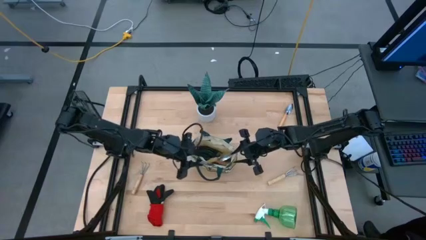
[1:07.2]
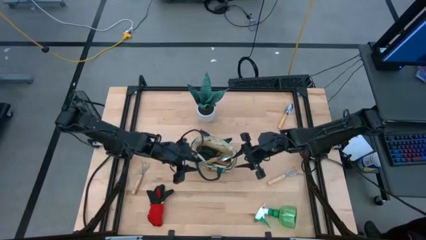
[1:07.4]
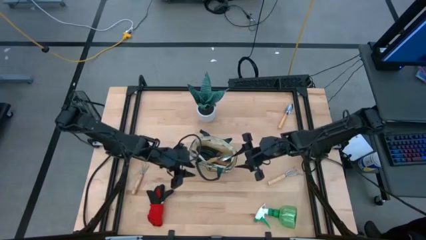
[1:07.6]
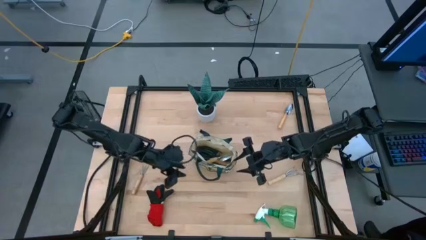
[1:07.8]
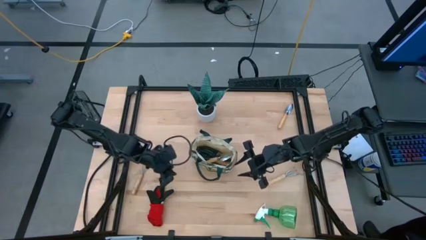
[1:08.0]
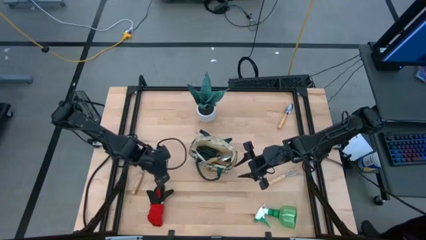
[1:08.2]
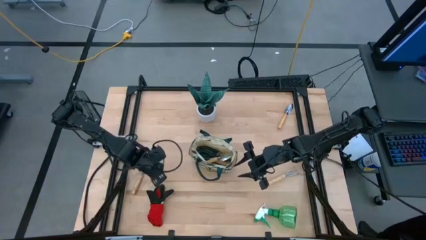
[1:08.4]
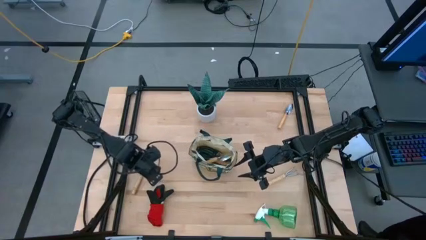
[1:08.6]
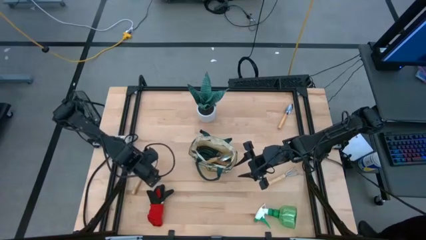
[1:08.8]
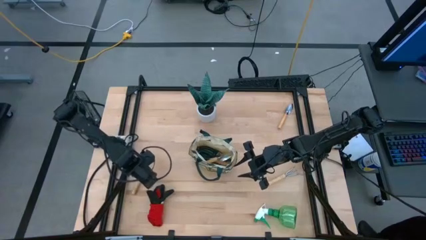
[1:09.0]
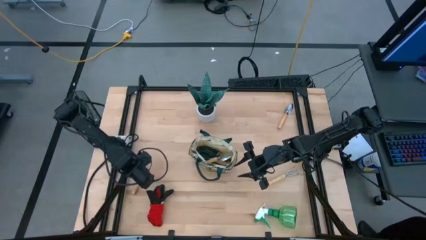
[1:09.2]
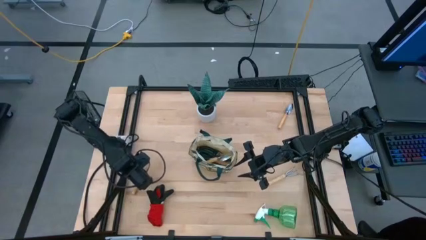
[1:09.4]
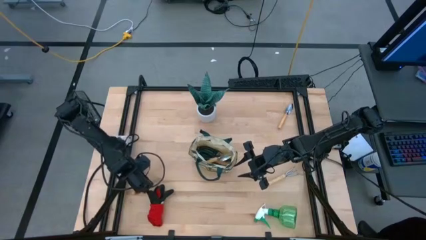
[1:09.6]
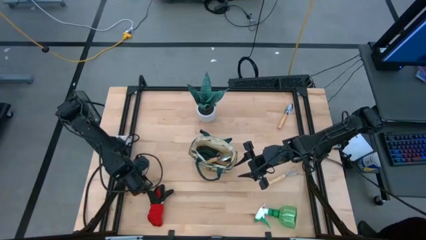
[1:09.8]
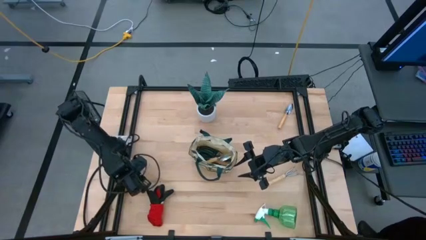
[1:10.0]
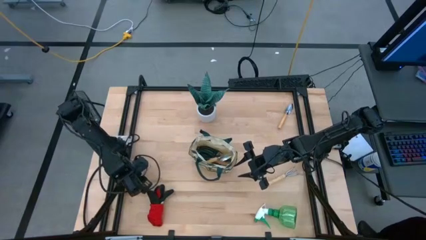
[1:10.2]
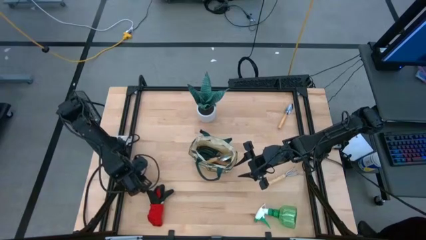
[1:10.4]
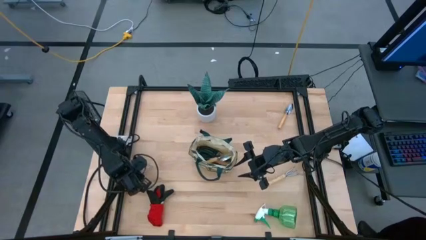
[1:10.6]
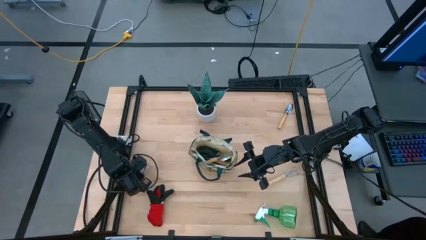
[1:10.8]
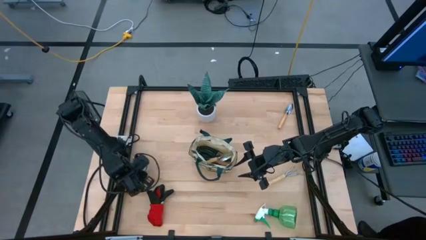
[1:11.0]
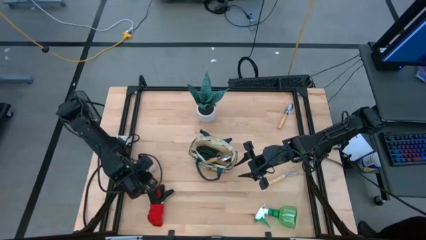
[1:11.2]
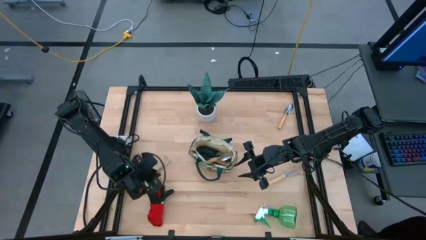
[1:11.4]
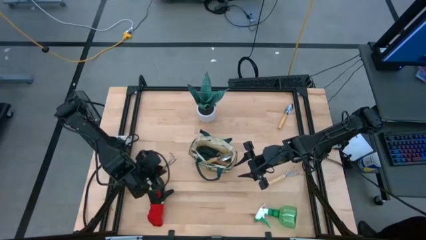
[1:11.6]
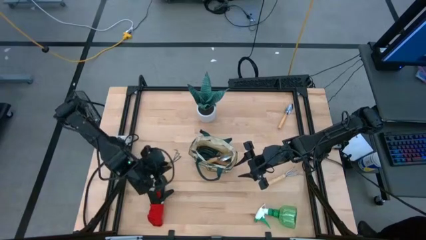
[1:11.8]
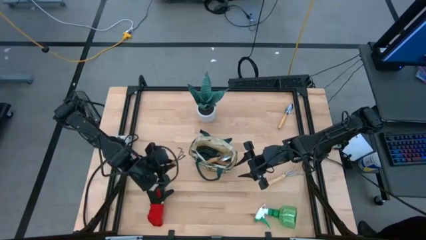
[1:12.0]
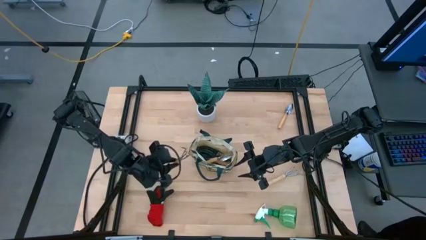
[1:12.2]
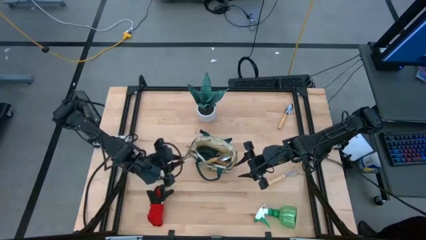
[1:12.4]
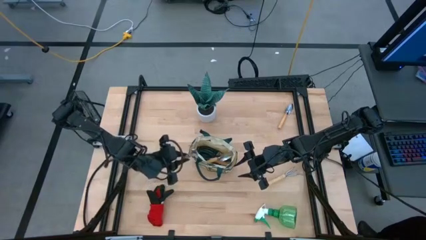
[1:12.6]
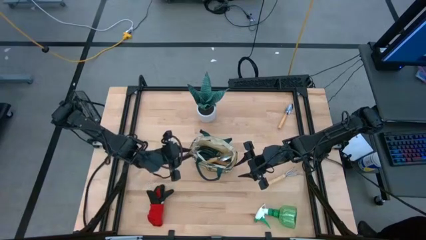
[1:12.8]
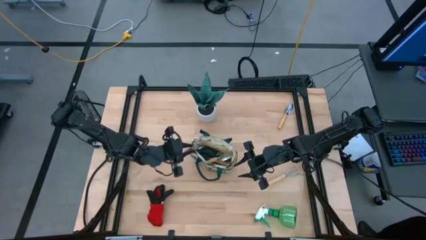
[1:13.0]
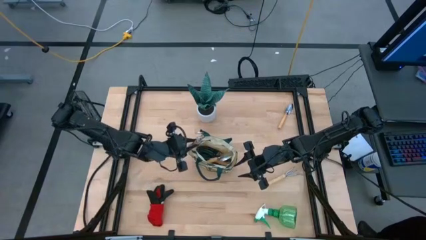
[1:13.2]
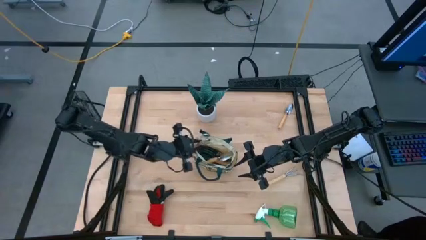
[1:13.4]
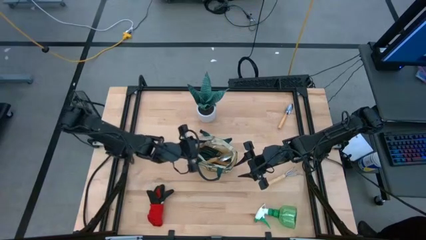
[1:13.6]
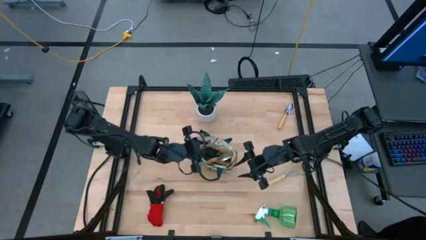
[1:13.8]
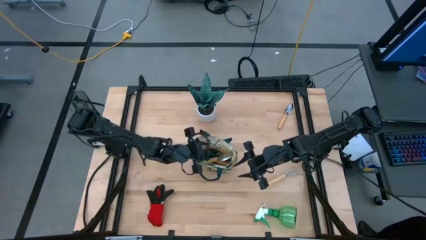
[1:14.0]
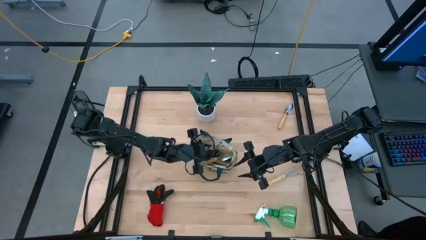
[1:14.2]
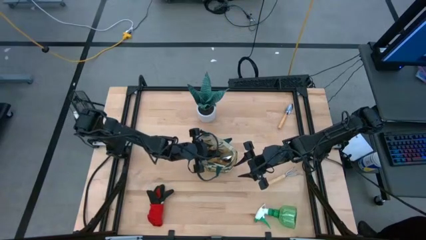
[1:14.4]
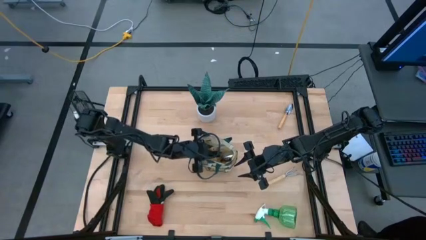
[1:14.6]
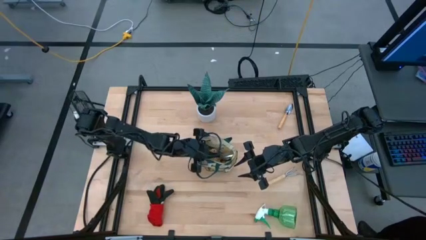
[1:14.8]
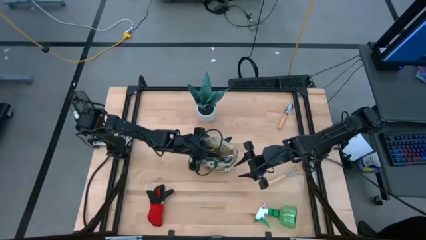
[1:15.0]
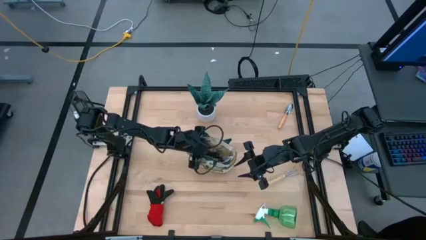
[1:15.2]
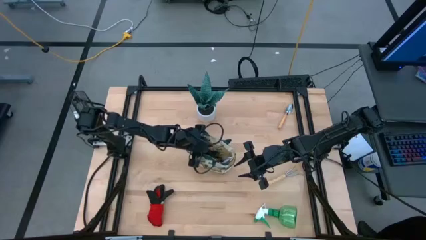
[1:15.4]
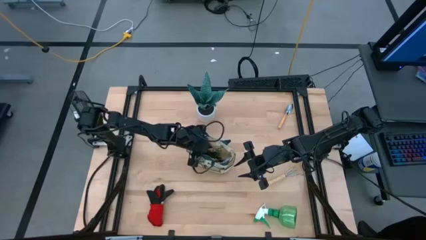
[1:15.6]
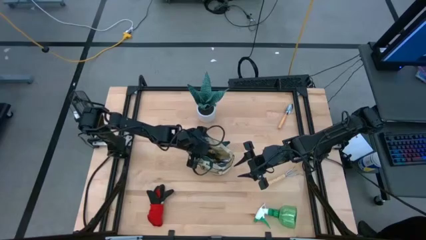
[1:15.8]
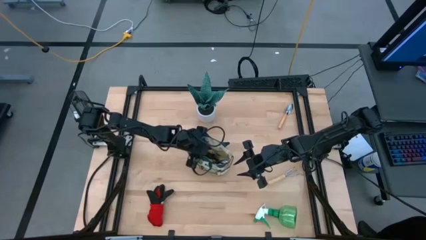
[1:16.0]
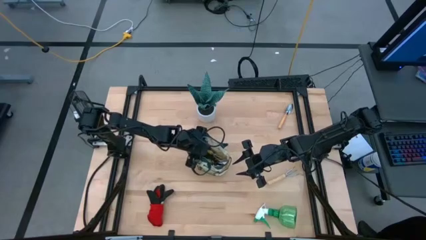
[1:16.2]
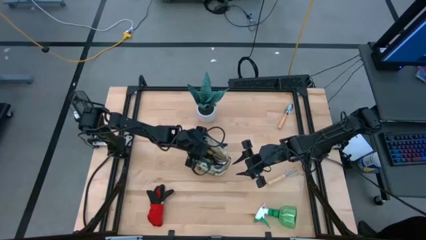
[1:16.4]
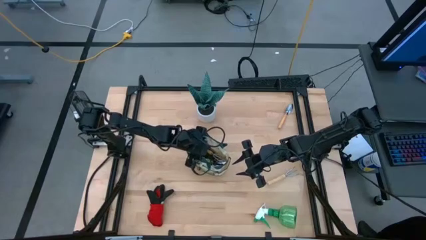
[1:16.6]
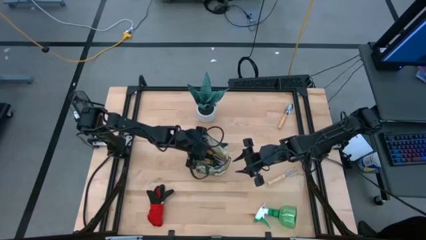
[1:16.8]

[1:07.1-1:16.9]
Task: Pick & Place Garden tools in Gardening bag
Put the left hand rake into the gardening bag
